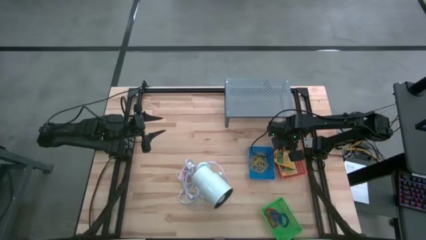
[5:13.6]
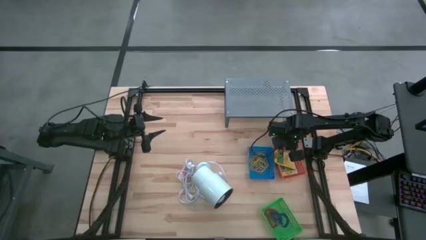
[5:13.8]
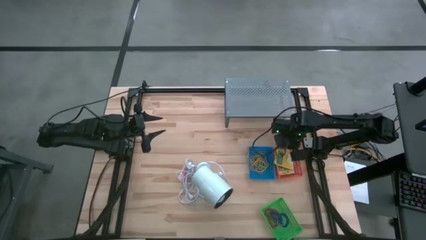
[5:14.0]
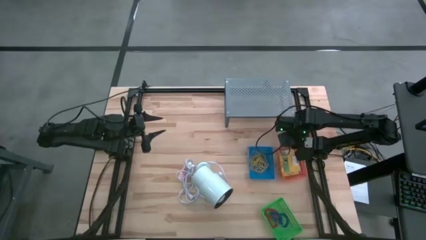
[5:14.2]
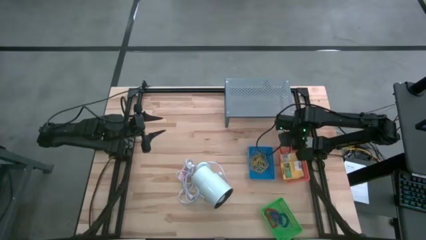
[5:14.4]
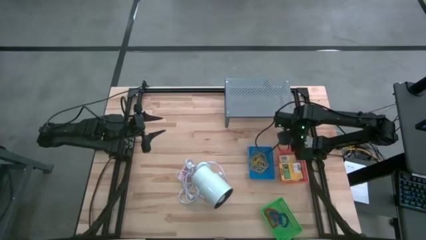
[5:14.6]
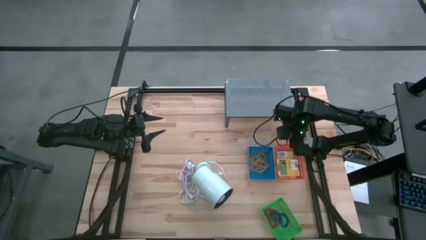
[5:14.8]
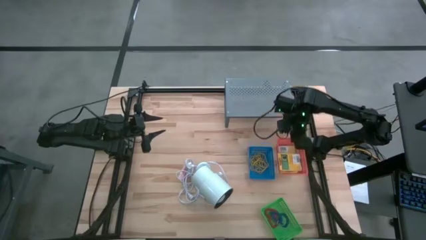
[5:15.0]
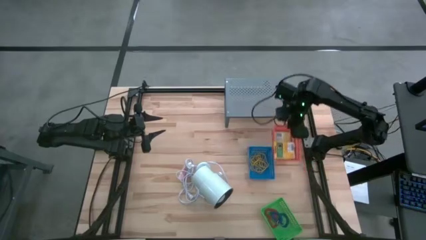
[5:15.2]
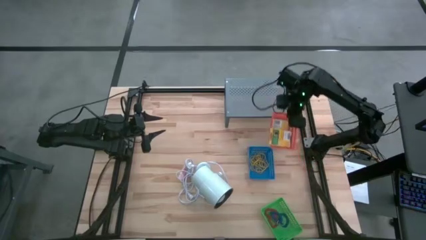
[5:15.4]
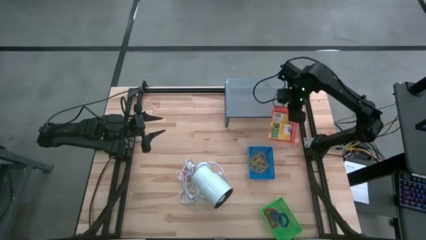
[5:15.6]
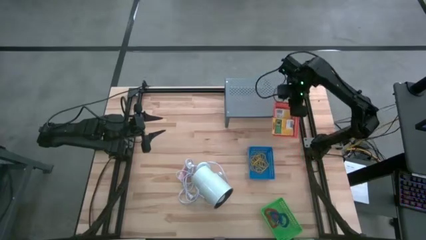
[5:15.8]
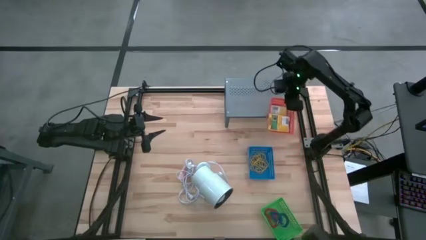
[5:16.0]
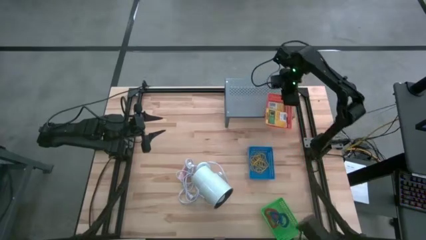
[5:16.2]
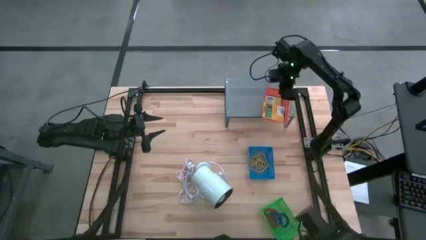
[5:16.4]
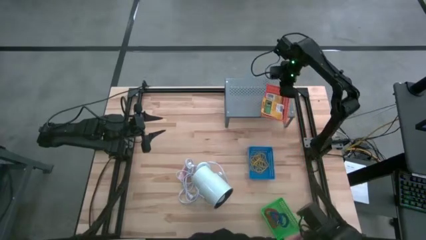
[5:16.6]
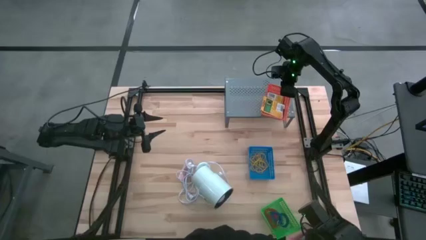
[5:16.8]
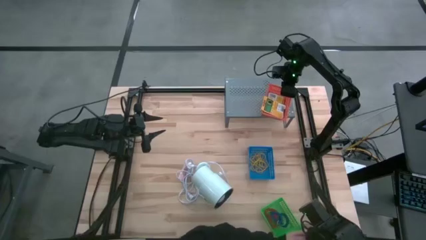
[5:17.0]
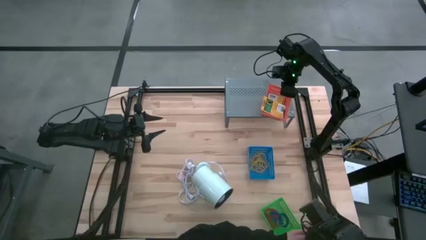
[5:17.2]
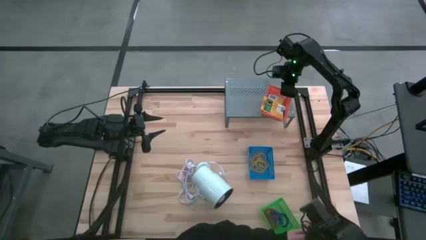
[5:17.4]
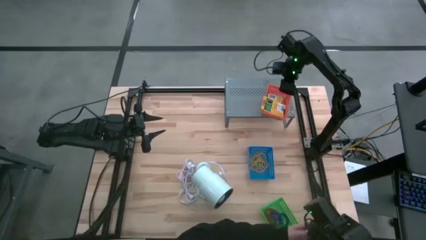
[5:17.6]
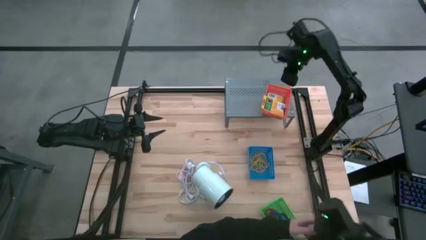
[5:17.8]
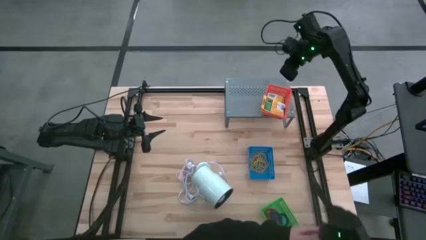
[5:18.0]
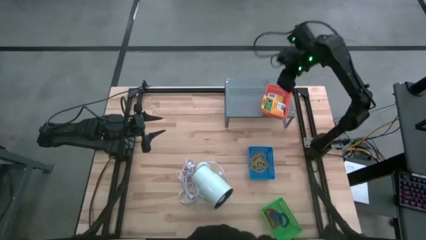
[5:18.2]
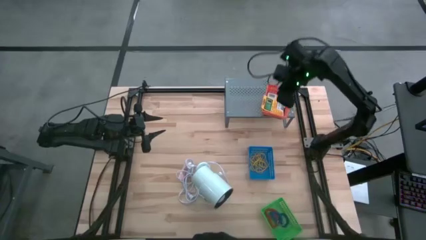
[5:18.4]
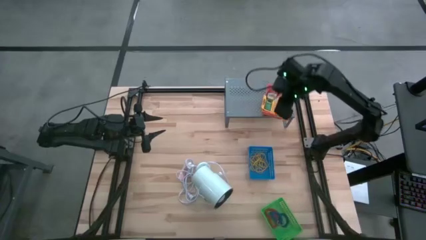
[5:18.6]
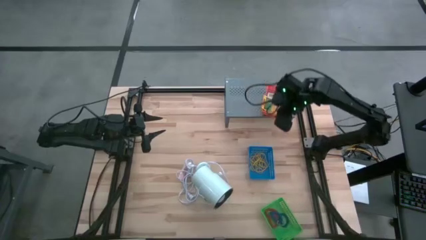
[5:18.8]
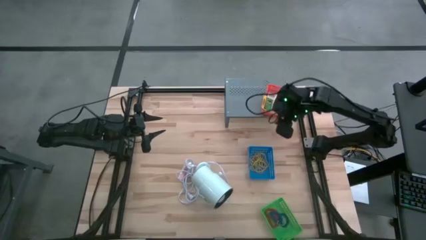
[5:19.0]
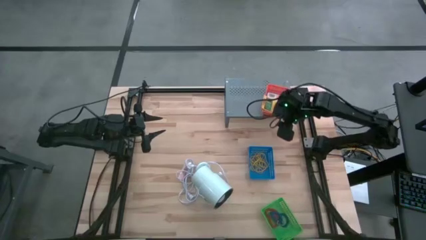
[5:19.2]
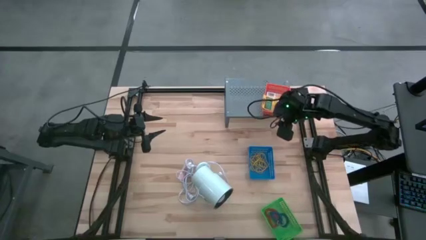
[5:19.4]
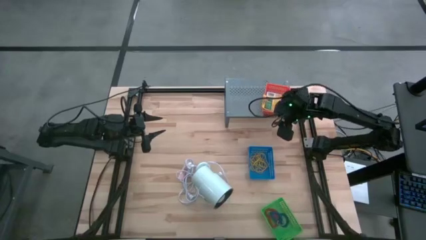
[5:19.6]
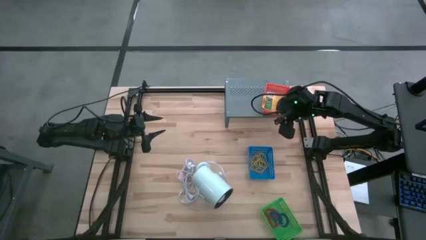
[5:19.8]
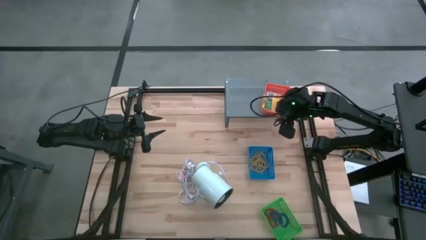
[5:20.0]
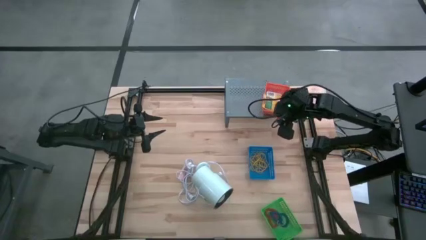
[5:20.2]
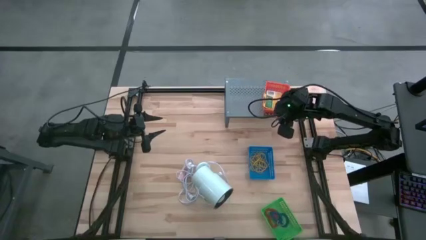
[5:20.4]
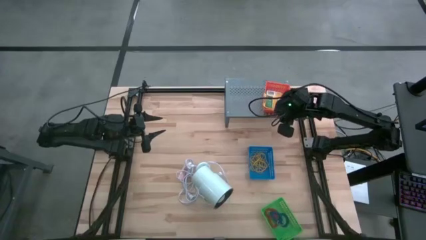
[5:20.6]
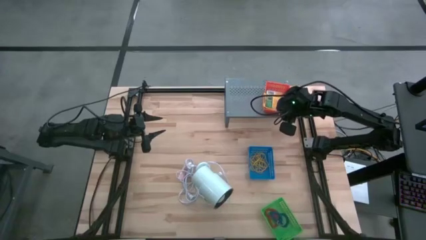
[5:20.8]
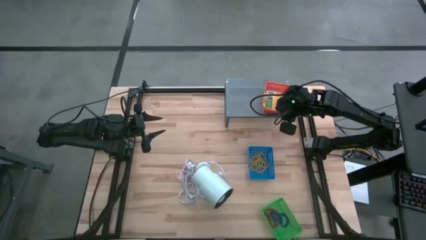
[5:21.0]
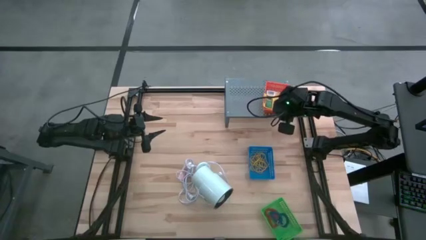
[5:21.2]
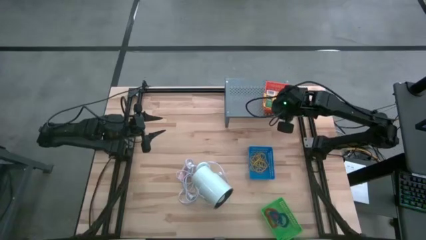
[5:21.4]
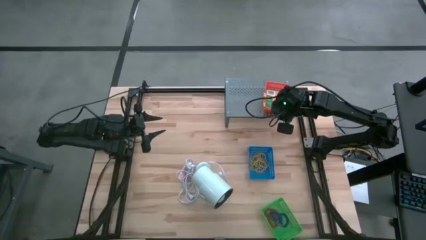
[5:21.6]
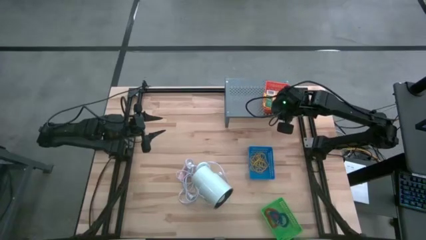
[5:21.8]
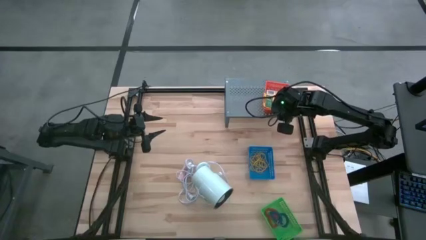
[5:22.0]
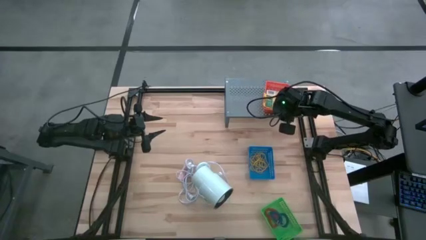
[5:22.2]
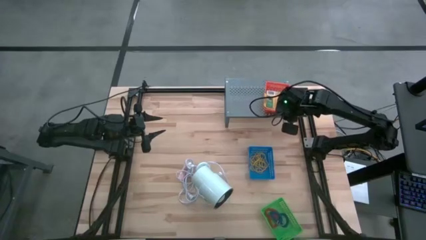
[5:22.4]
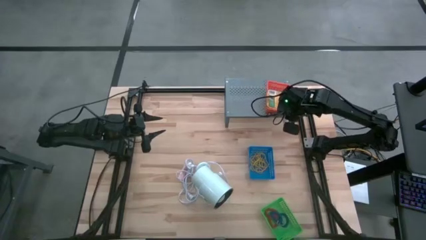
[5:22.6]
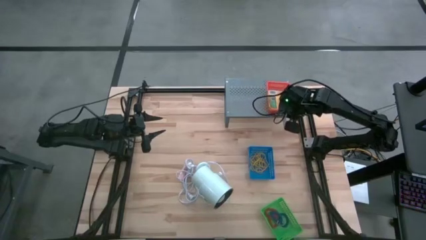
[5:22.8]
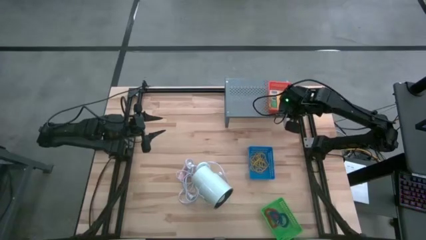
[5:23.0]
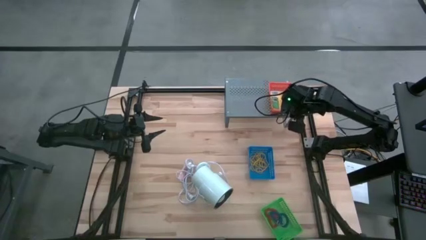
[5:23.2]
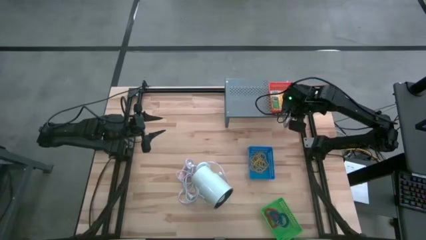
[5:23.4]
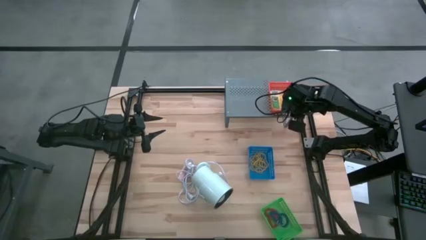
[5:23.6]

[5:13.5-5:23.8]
Task: Pick & Place Office Desk Supplies
Put the orange bin with the sorted box of crayons on the shelf
